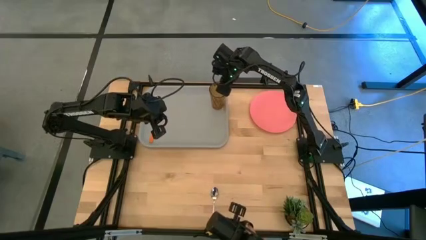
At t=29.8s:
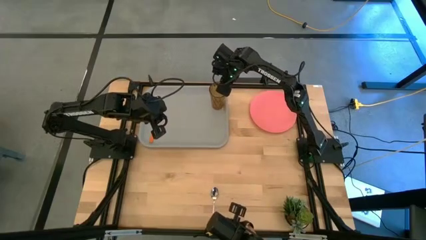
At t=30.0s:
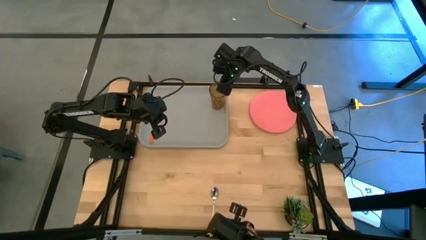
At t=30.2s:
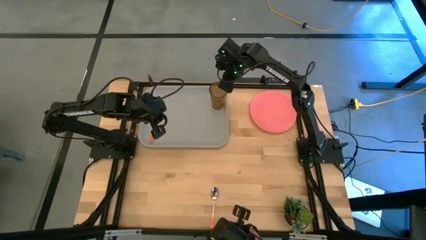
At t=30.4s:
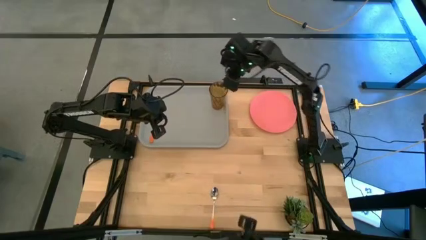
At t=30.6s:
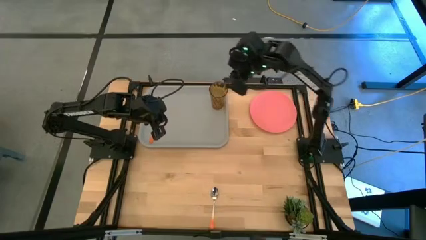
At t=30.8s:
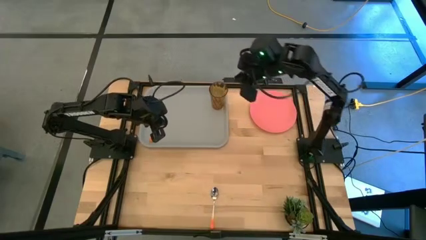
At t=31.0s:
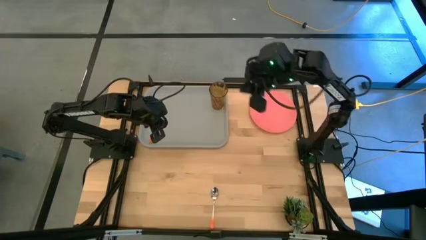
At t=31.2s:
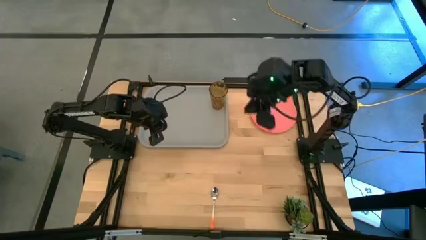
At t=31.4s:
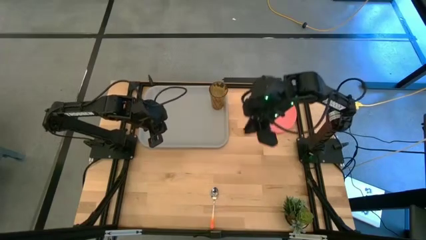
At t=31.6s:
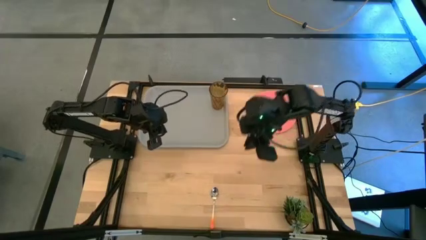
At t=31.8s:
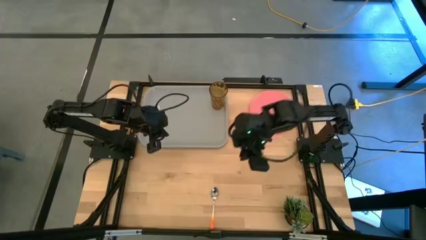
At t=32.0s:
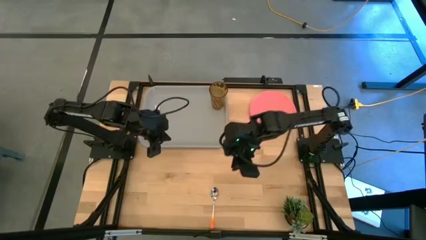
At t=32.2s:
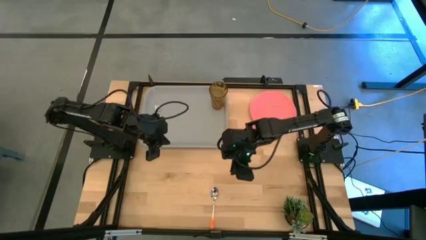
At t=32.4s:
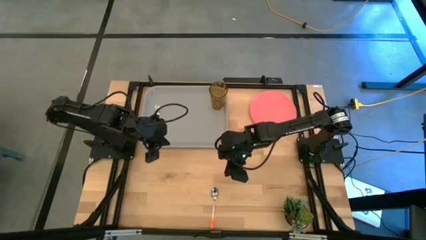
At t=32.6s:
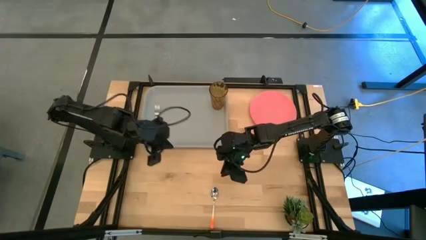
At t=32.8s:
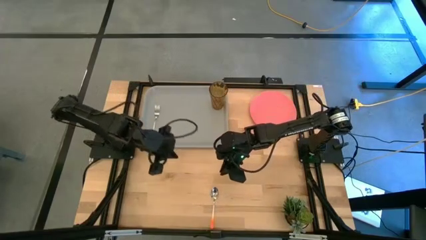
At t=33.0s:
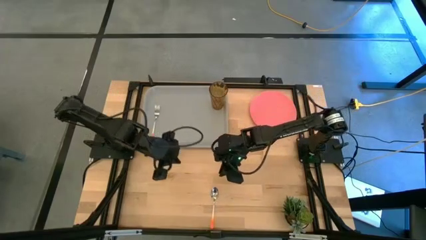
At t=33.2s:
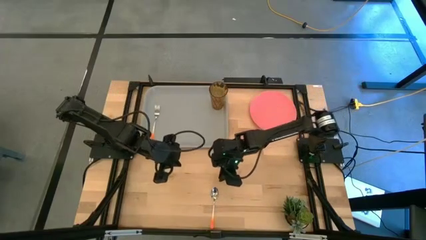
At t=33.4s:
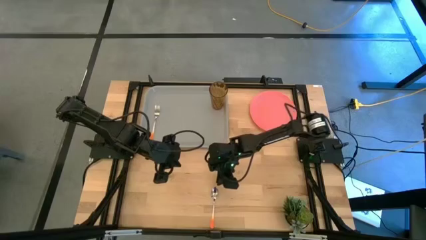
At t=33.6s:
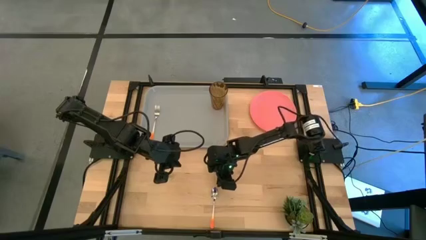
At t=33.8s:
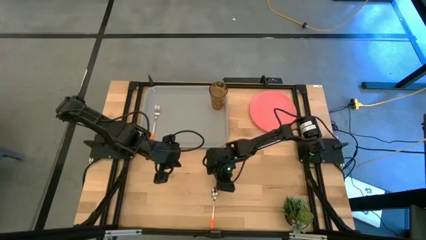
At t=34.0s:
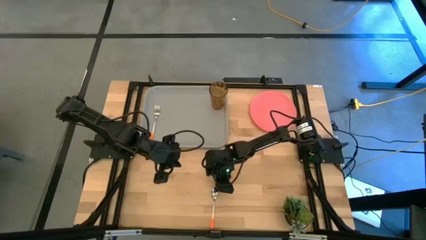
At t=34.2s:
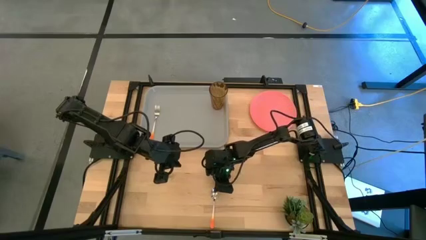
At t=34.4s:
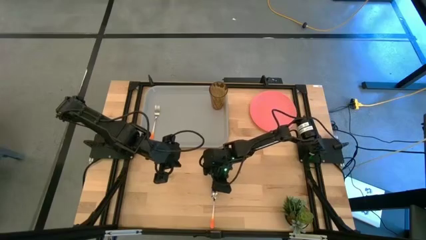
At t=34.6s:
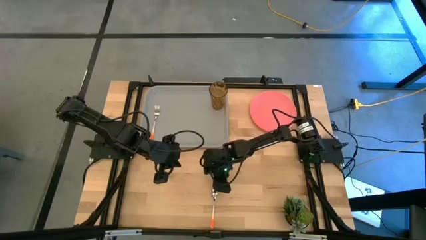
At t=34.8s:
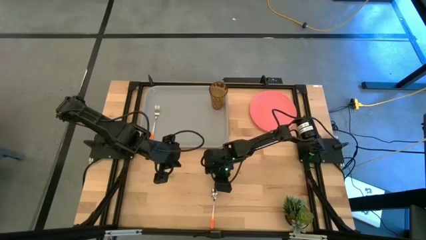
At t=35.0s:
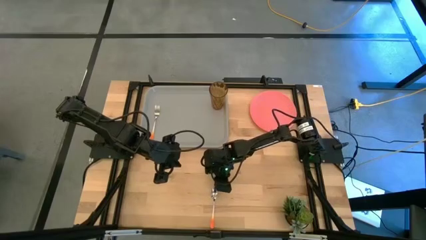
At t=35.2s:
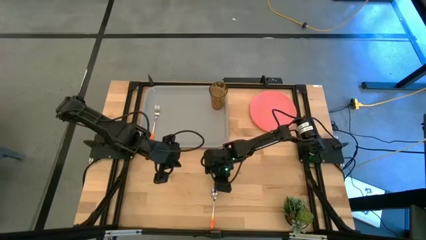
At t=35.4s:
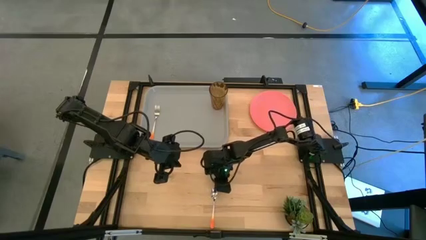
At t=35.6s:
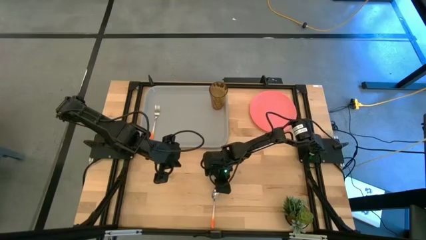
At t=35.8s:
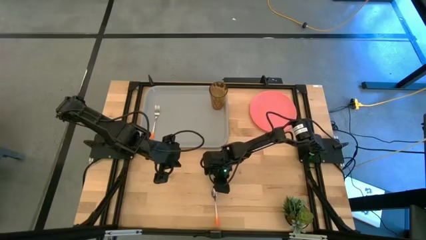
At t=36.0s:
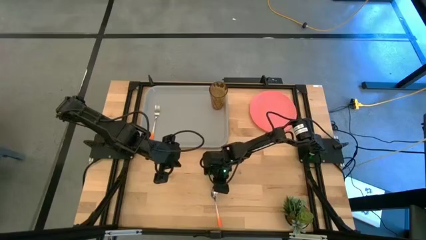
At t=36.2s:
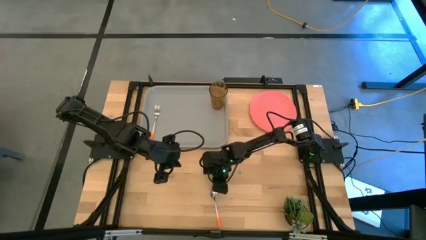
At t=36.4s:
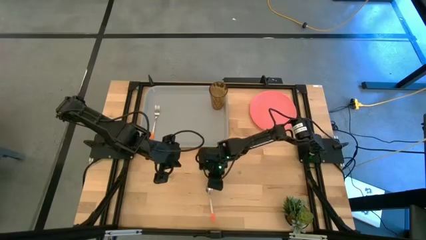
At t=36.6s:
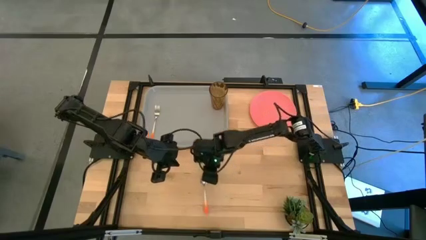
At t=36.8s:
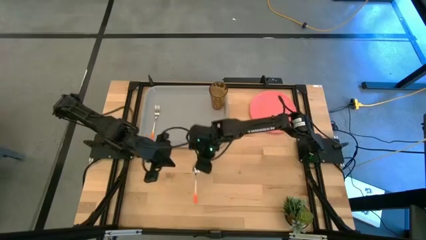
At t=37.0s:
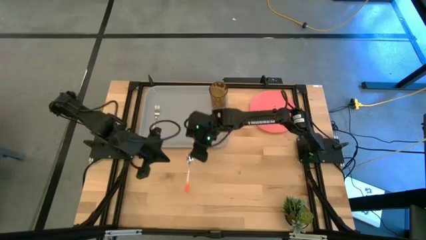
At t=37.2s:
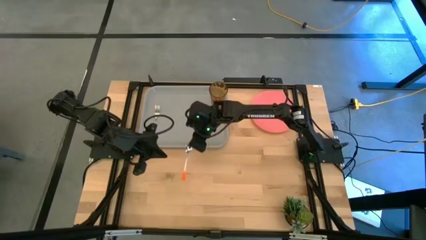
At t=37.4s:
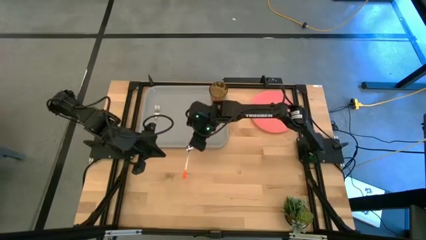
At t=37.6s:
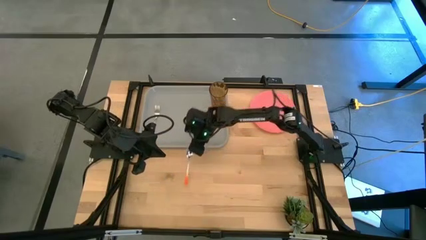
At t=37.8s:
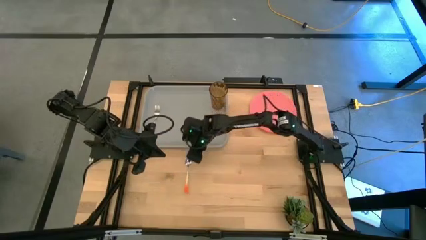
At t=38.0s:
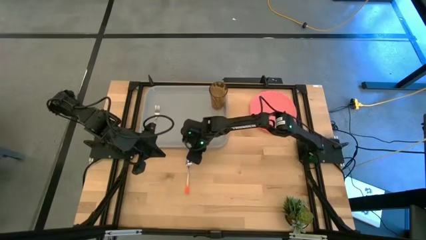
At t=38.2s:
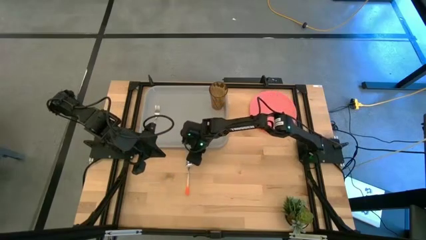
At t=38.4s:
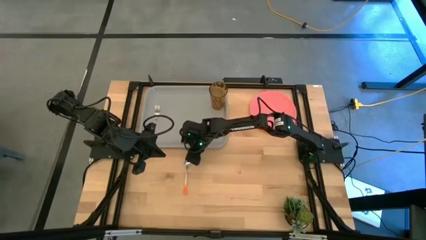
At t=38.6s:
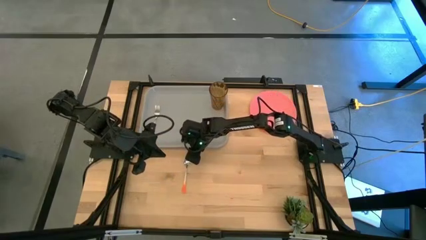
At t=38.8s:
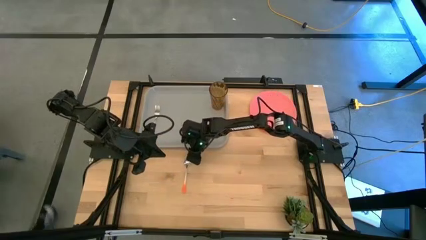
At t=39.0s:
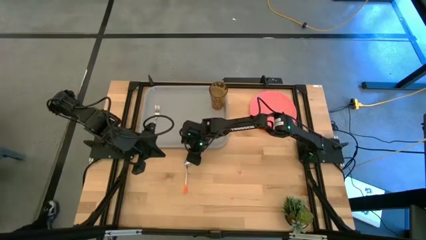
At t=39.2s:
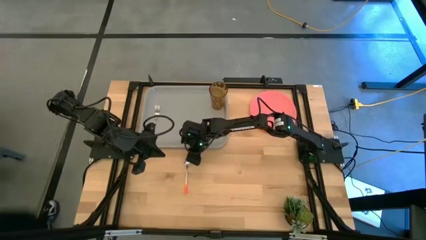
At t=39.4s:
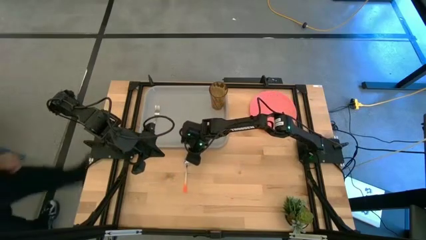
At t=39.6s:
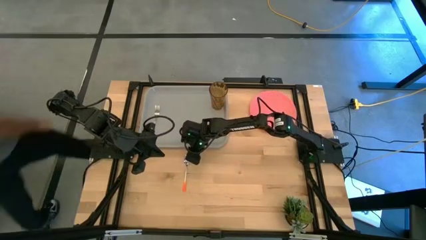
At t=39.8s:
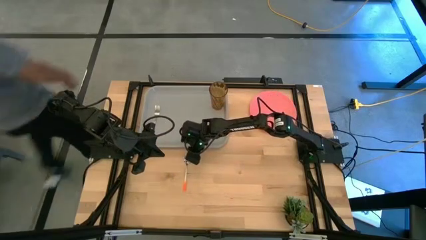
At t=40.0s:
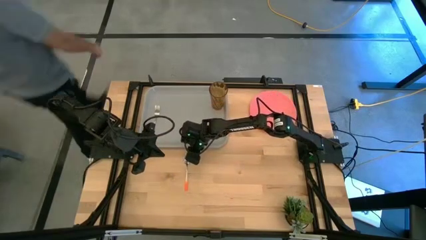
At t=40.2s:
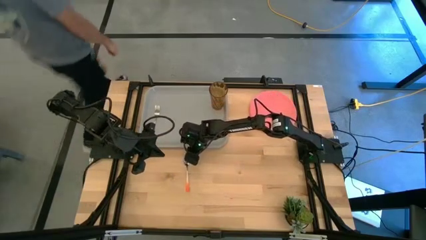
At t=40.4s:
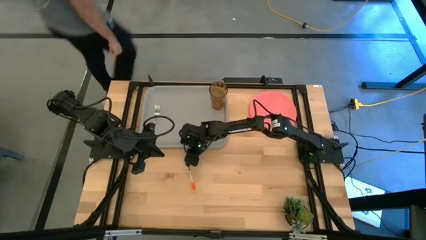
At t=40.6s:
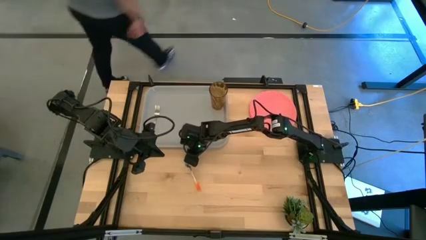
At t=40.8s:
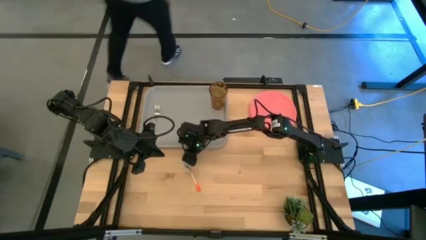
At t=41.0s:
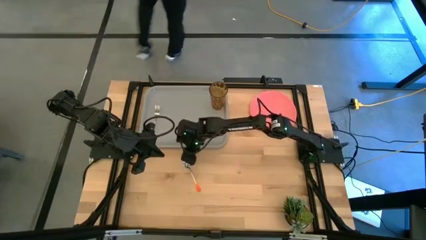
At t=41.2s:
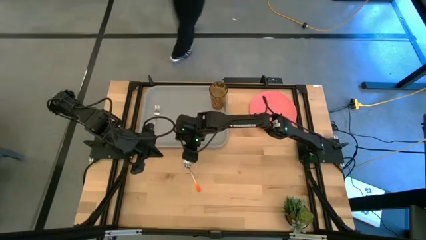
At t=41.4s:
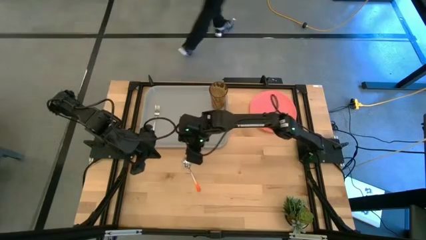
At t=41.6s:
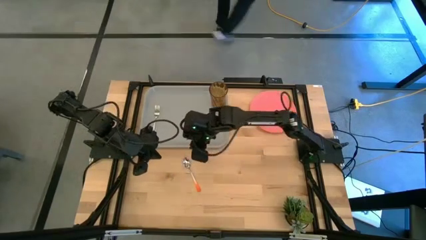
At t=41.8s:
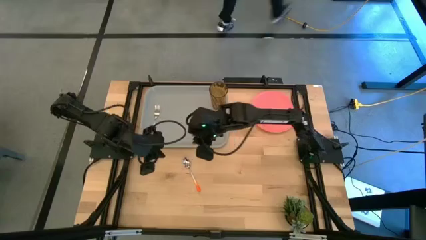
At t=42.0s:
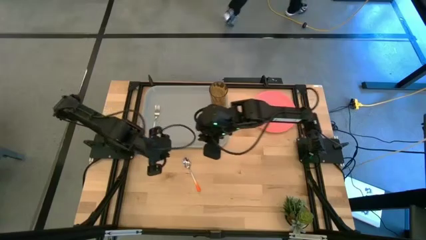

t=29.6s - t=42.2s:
Task: Pick and place plate/cup/fork/spoon on tray
Put the orange spoon to the right side of the orange fork on the gray serving tray

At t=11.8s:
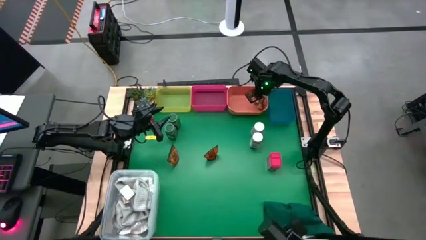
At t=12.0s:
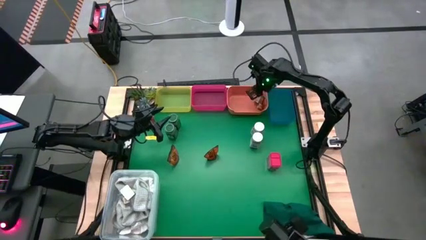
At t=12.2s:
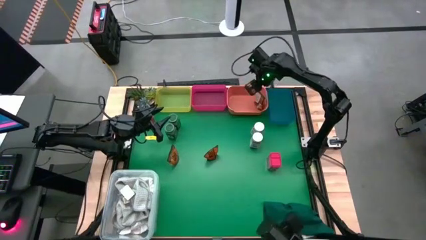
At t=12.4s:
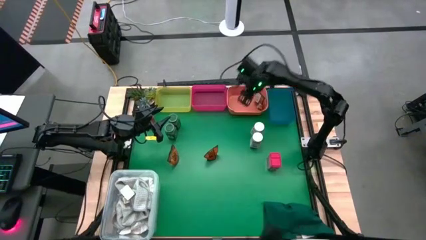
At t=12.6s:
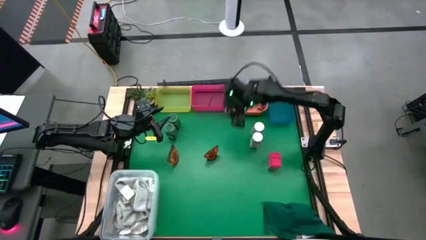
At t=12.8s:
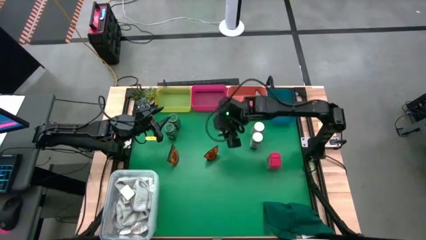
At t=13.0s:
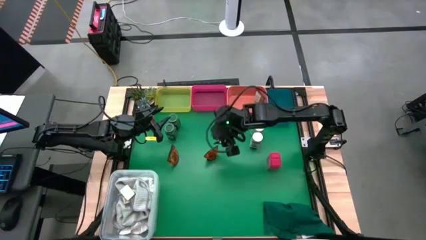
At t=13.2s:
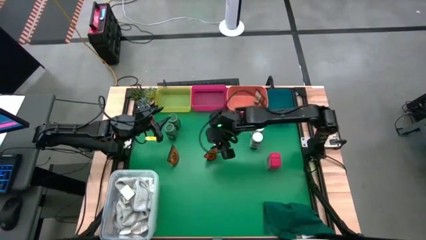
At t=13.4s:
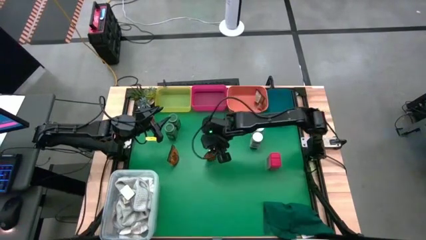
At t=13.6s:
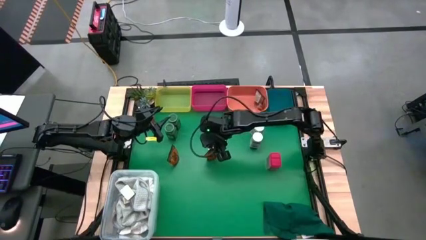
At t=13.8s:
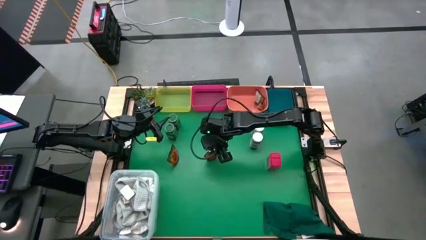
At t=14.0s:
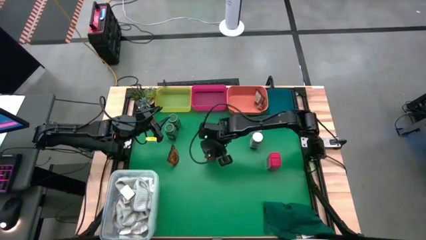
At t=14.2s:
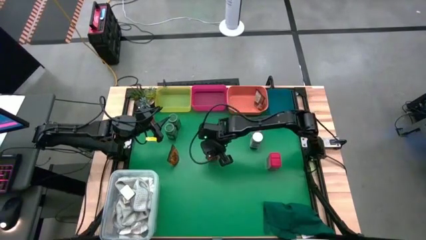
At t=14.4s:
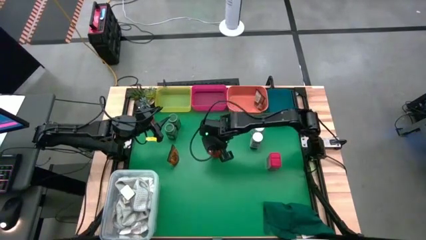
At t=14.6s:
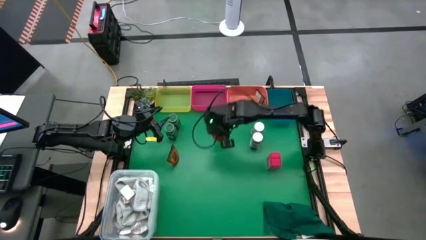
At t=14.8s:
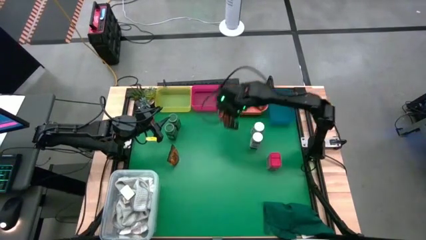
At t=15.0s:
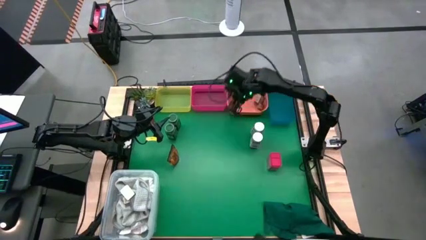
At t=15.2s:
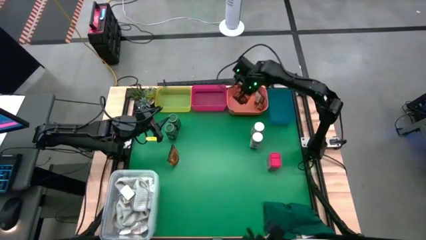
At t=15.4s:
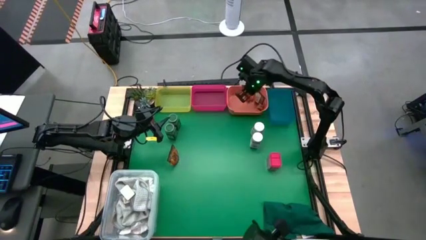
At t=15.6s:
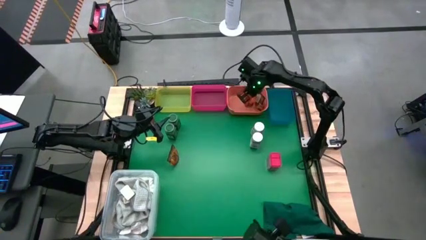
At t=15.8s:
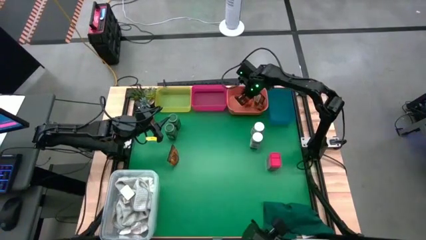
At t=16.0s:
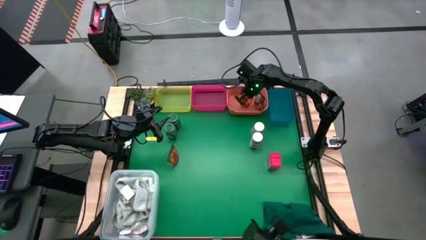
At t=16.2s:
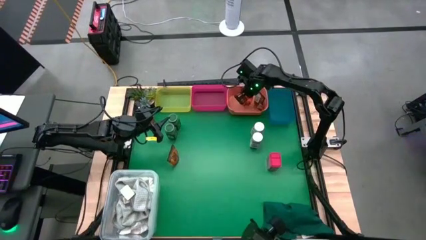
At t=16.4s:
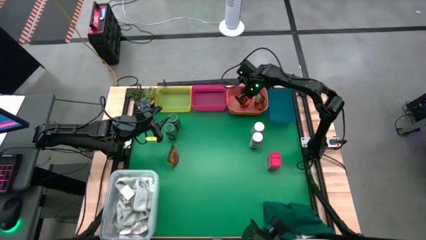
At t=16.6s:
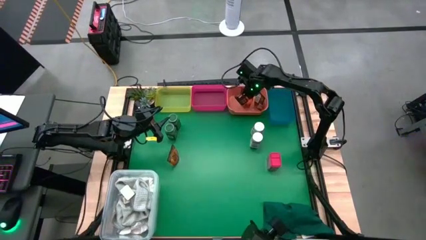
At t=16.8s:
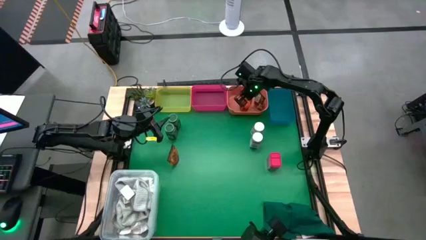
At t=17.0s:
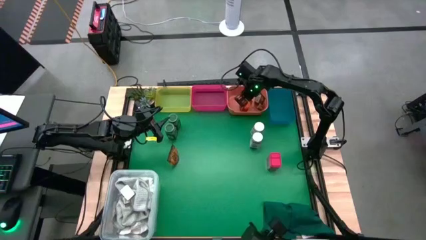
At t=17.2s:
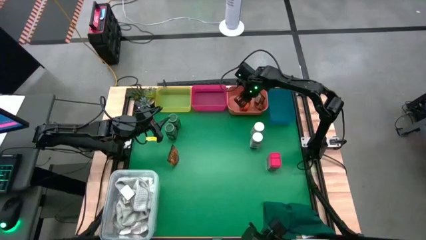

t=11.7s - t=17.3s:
Task: Sort spices by type
Put the right orange seasoning pack into the orange bin
